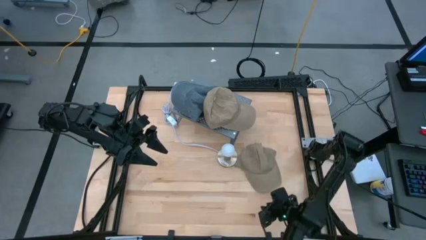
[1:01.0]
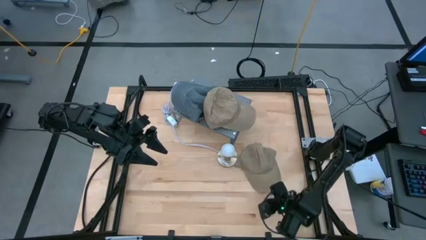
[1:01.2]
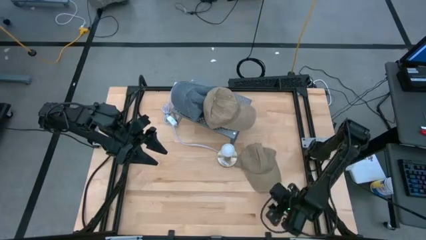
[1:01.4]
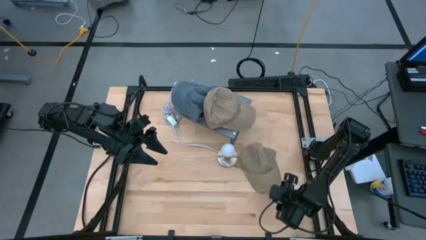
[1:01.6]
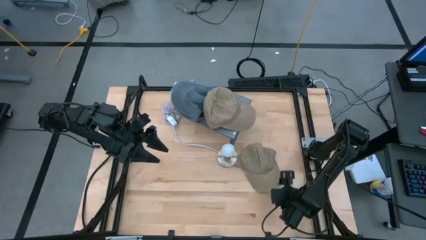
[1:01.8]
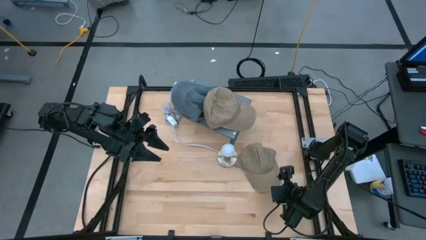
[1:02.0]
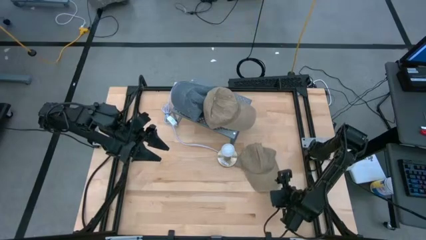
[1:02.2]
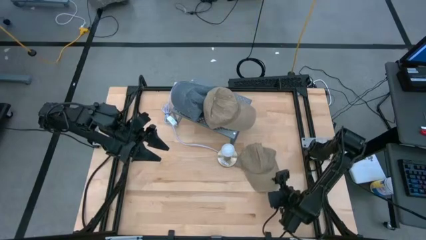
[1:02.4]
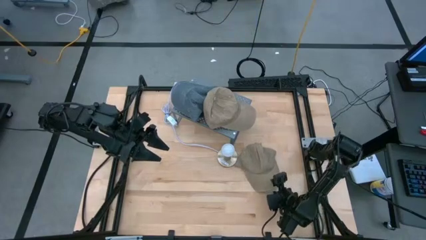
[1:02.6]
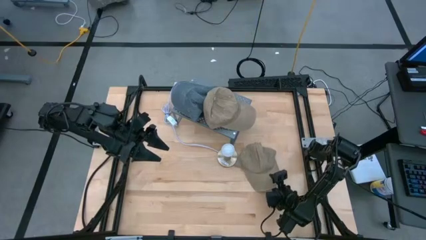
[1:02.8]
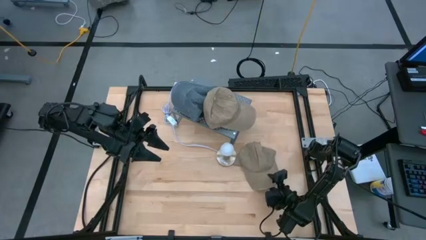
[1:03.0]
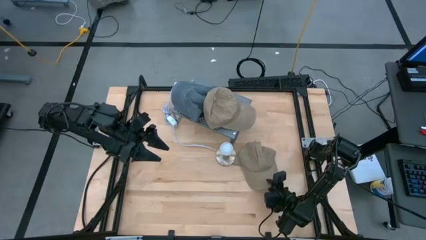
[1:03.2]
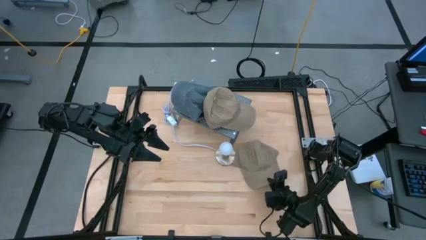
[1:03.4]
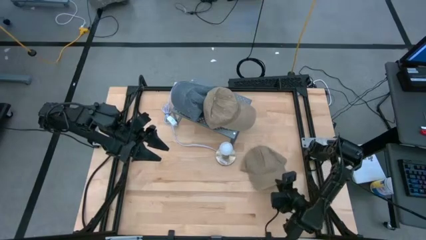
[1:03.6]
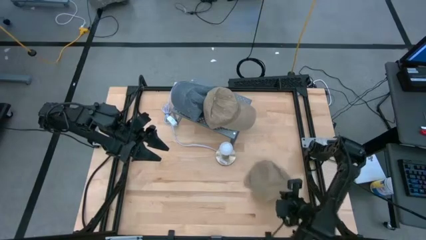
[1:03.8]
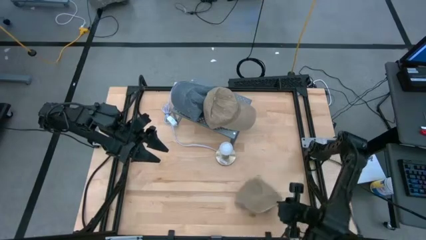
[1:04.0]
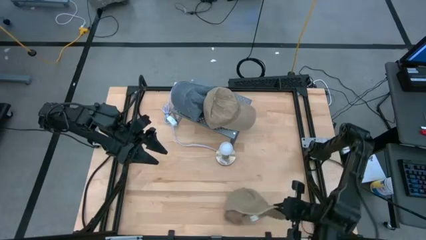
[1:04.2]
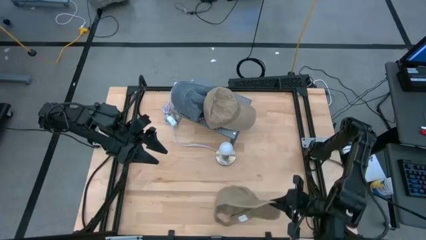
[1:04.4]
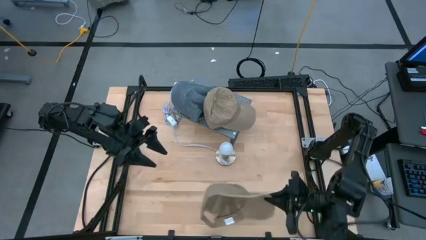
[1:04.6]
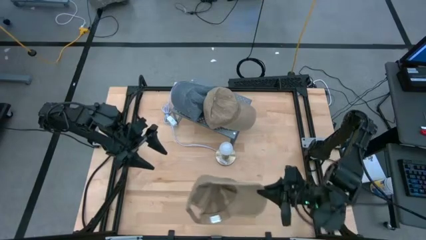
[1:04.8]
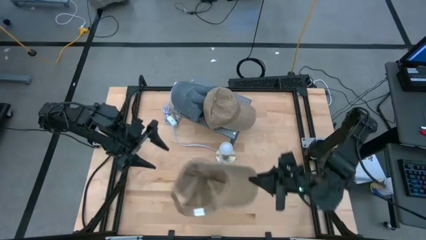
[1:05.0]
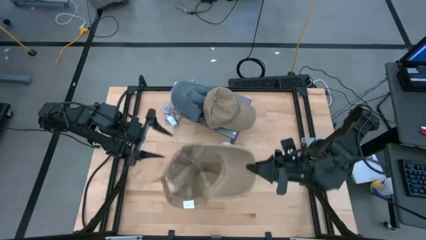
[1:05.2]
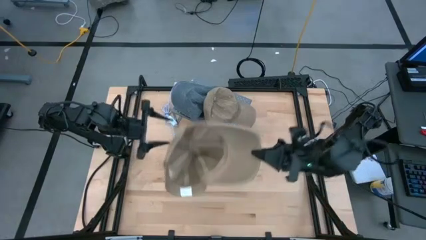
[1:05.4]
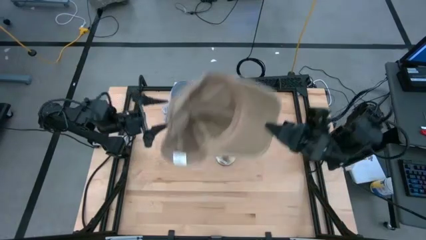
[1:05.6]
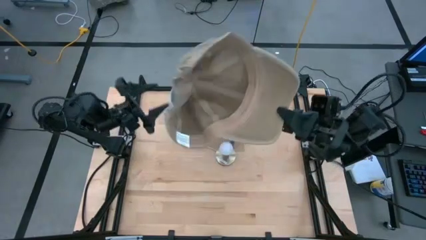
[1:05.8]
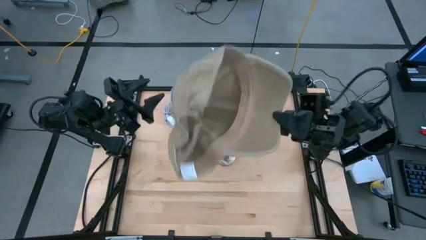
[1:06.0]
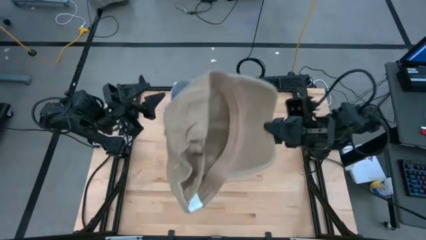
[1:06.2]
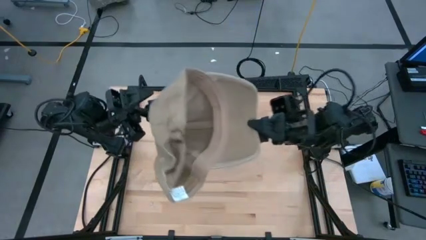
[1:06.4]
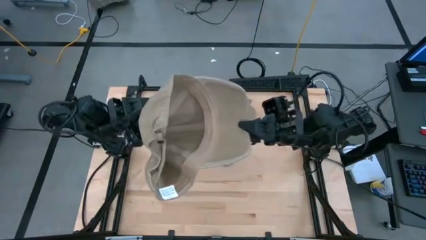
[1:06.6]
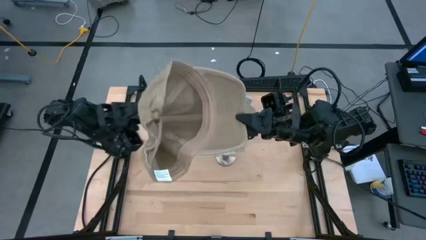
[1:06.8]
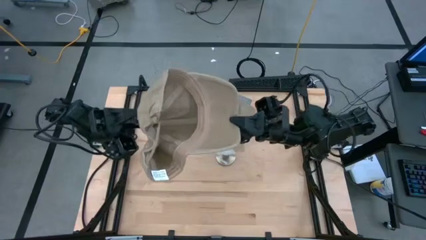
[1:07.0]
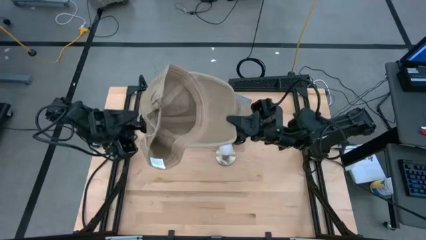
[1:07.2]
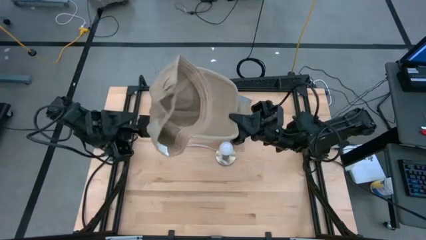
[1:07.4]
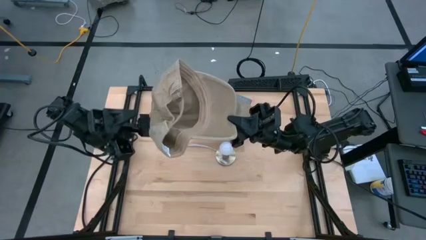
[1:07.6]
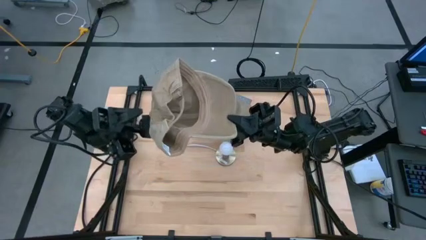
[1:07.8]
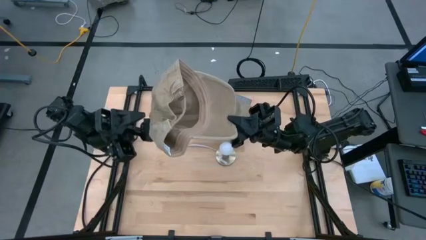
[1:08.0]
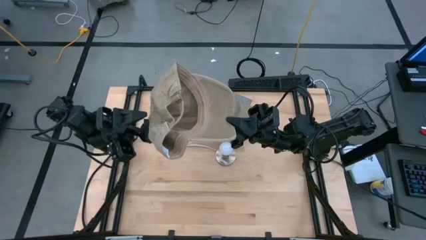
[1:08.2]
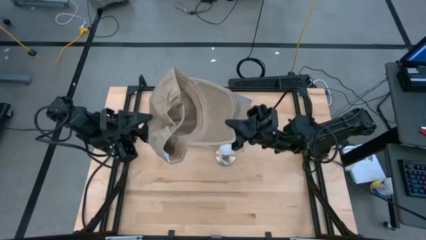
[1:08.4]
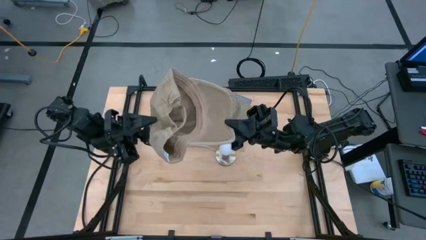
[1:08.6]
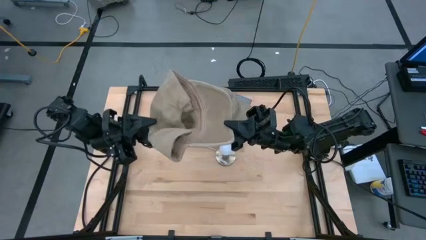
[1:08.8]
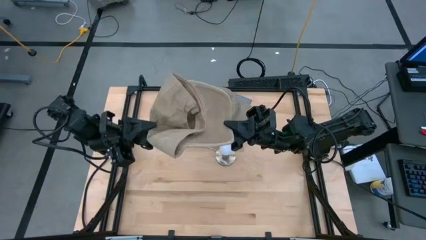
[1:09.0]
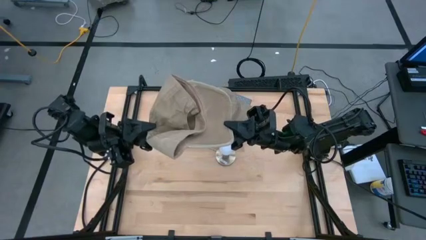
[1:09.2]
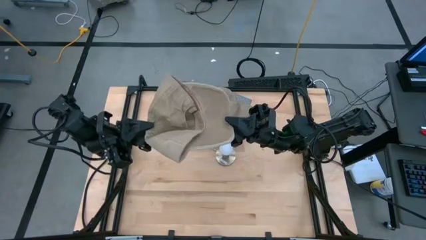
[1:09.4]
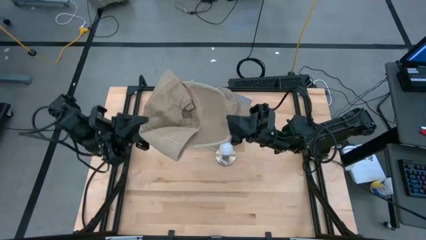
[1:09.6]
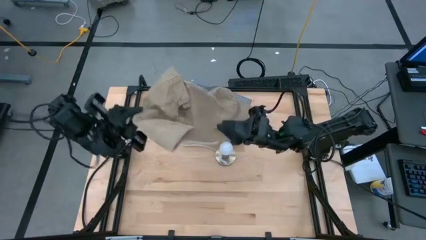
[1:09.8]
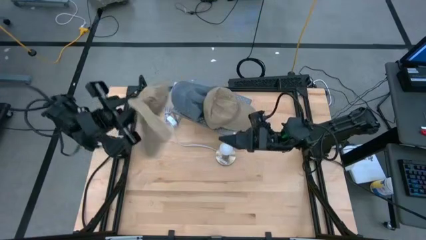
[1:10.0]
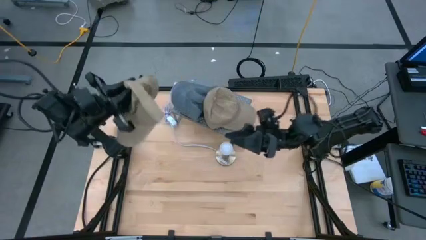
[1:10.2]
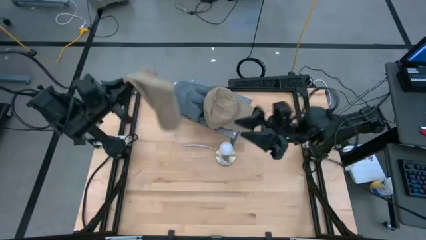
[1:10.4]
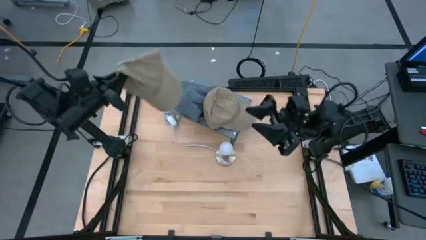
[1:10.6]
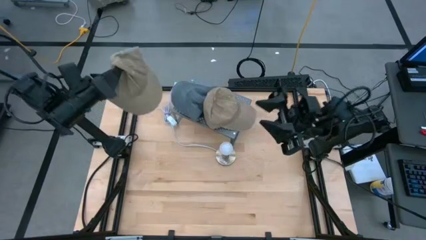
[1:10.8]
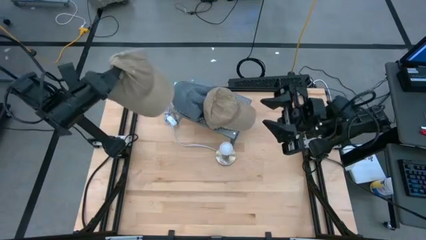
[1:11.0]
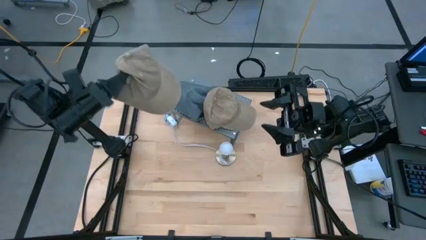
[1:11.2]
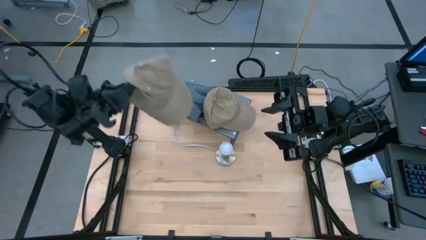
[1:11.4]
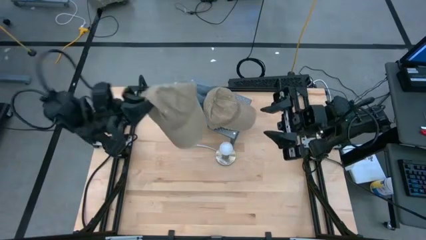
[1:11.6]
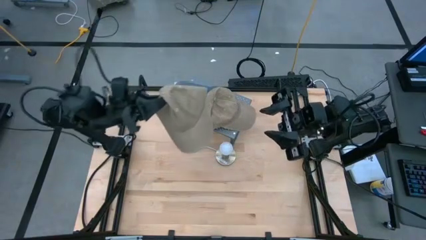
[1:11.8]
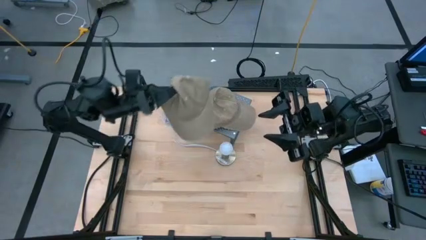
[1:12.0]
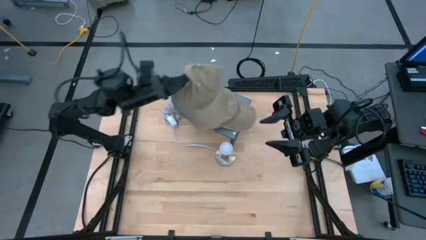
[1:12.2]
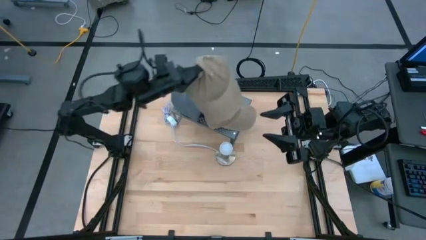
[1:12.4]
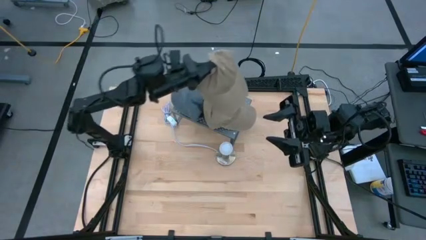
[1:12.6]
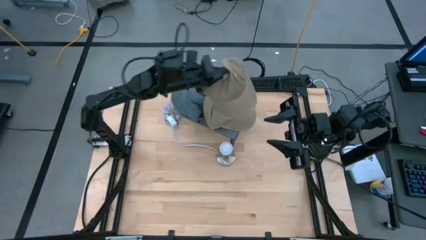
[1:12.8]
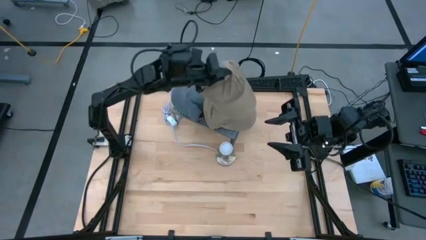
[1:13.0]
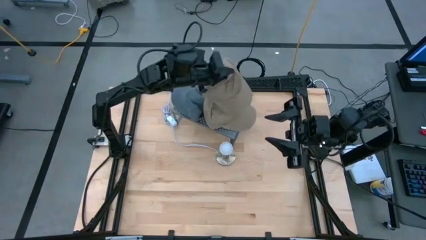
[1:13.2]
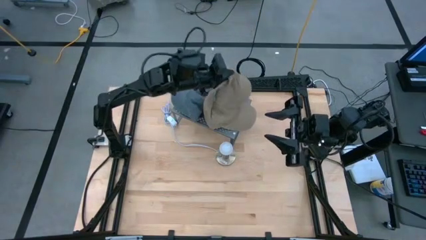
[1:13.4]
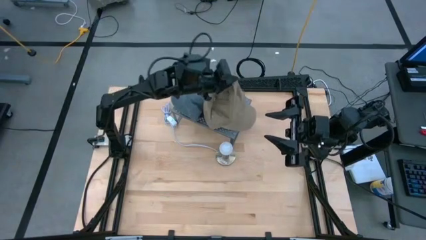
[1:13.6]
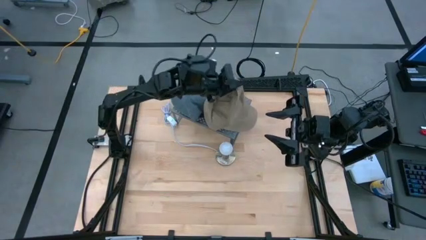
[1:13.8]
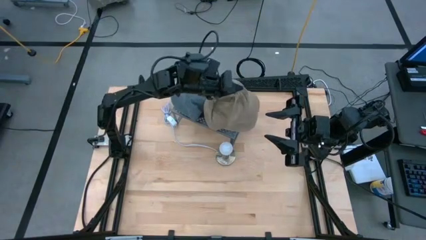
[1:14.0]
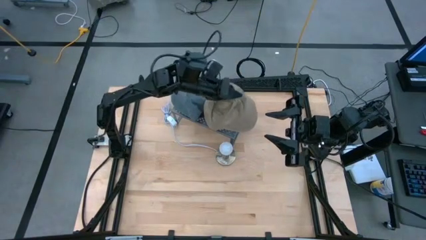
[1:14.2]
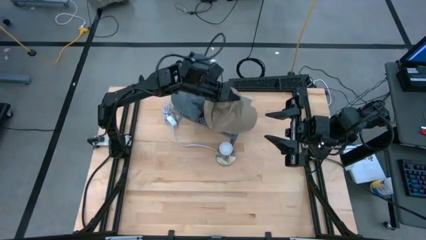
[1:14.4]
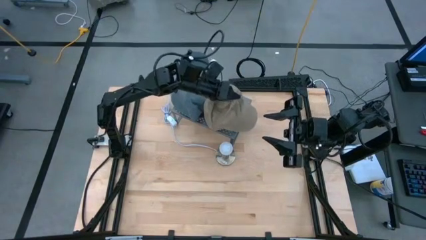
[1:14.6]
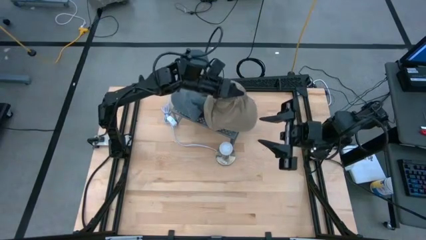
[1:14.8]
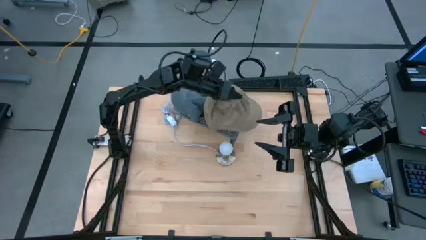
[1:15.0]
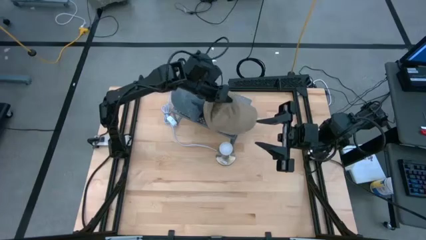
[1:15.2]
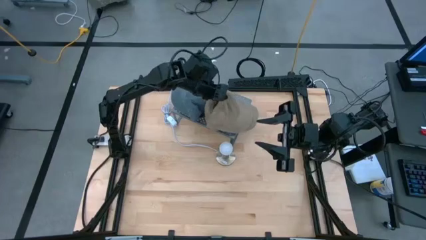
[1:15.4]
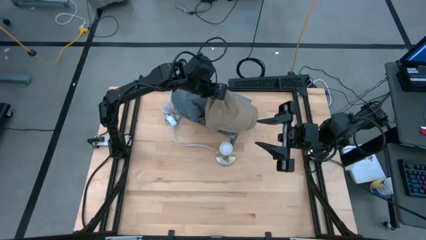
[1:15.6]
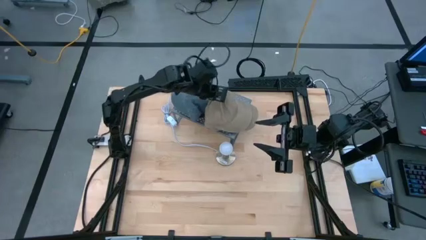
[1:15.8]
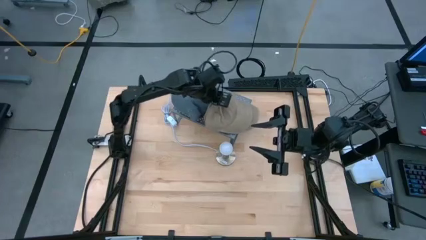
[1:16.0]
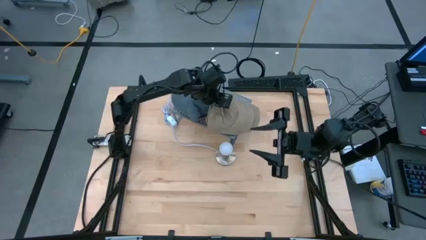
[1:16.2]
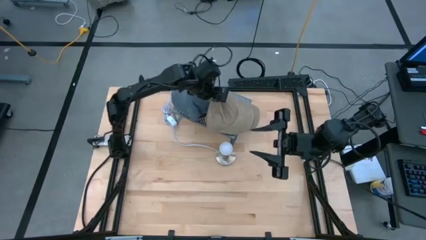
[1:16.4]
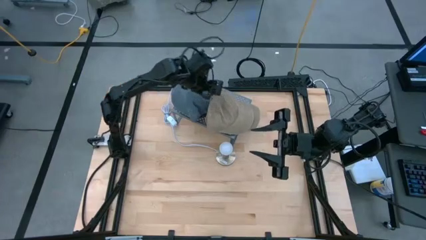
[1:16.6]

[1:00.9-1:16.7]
Task: Pick & Place hat
Stack the brown cap on top of the brown cap on the shelf

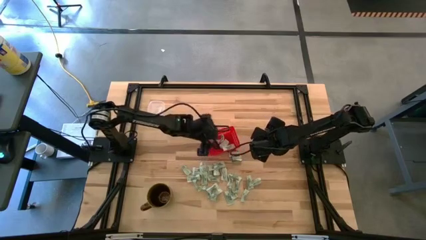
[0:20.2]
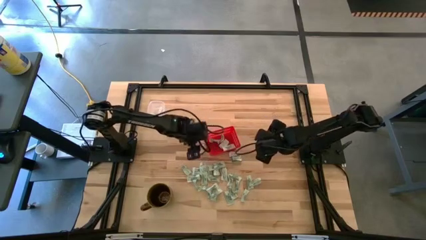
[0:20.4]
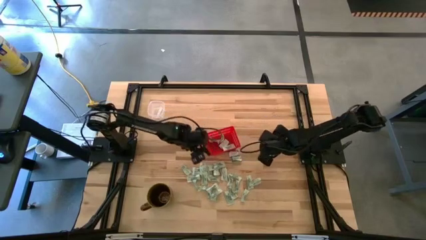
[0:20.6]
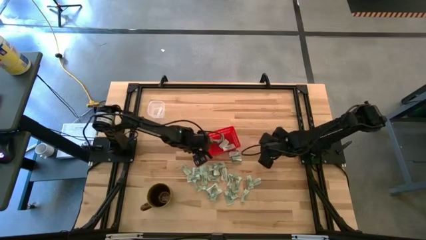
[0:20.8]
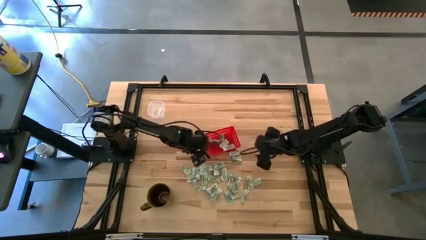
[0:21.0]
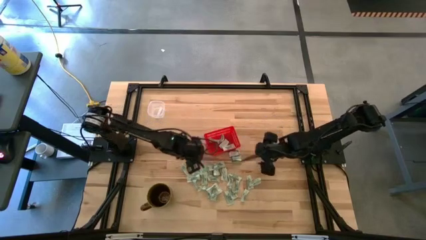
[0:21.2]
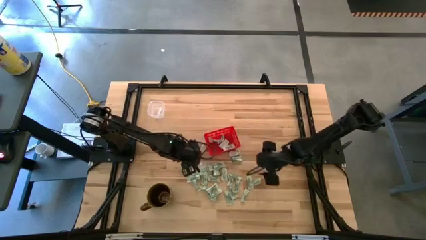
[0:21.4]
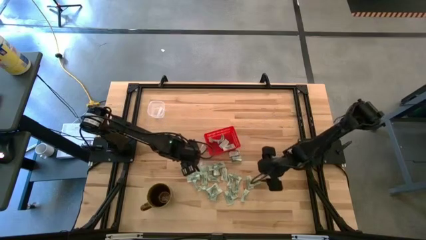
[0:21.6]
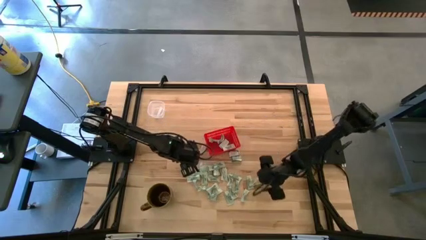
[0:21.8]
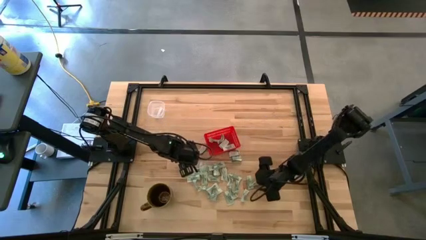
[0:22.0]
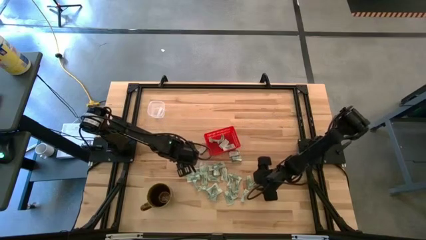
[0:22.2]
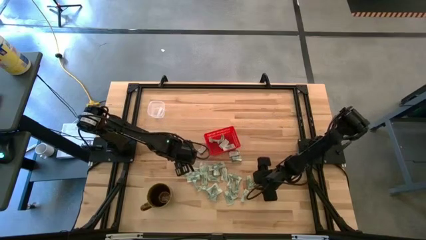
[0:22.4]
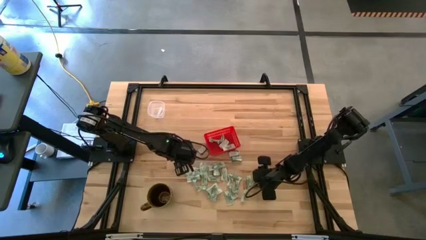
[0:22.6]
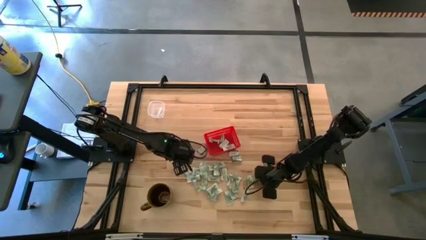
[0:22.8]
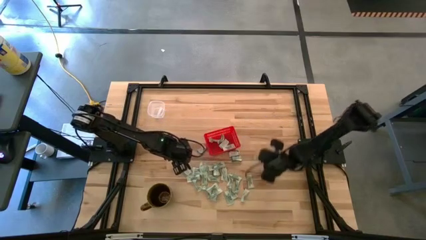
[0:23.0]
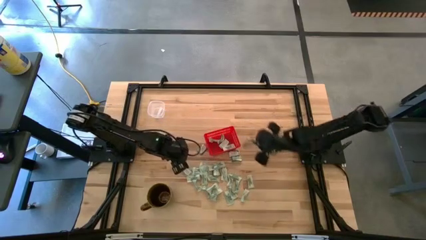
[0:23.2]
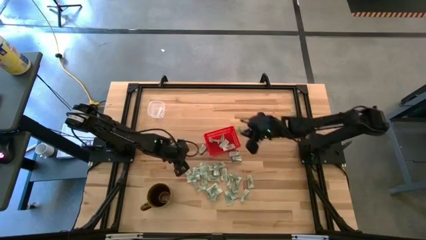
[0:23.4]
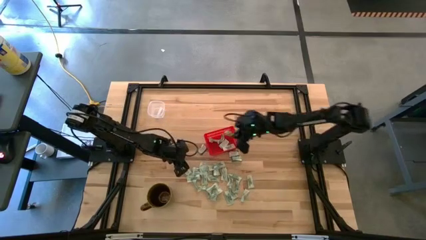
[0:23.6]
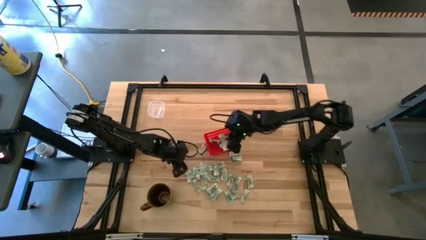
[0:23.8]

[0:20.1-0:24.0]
Task: Pick and place items into bin
Put the green stevia packet into the red bin
